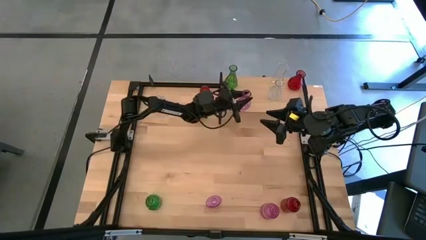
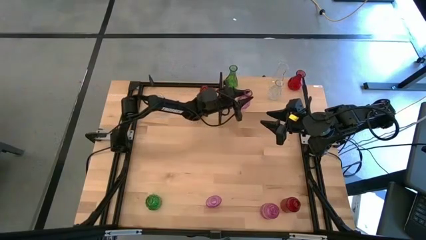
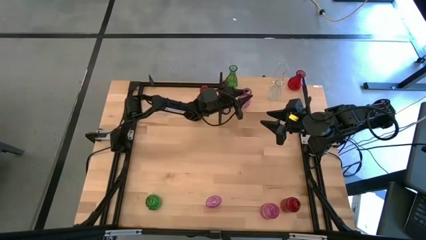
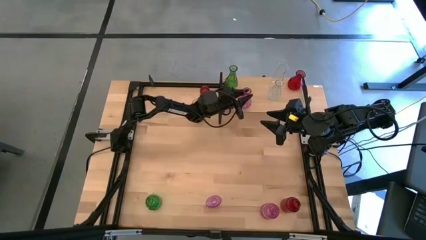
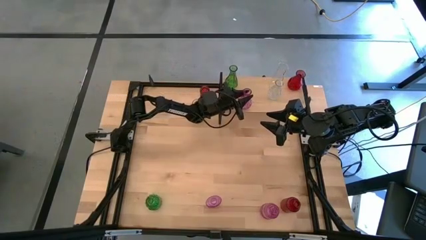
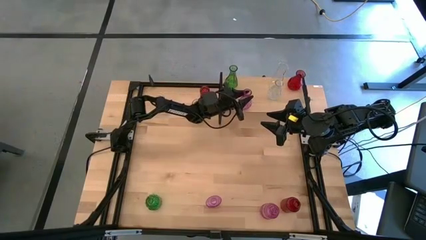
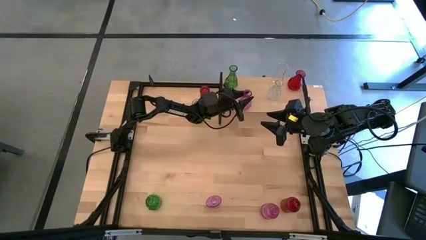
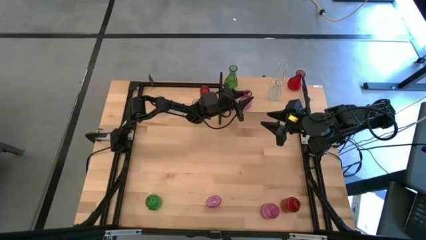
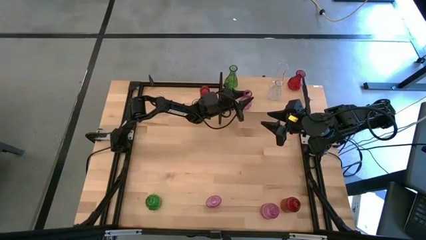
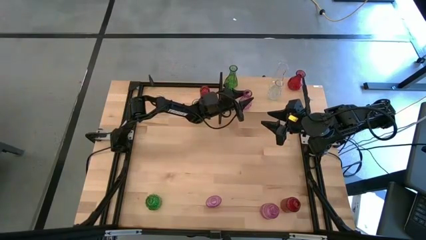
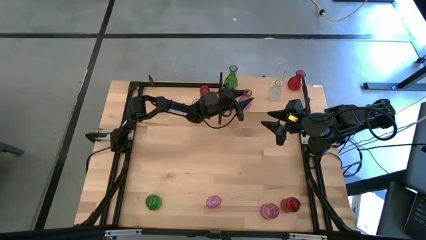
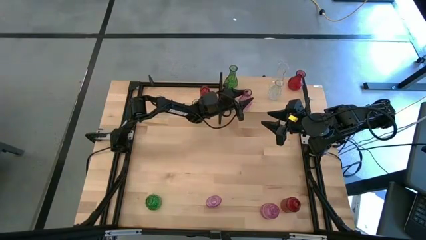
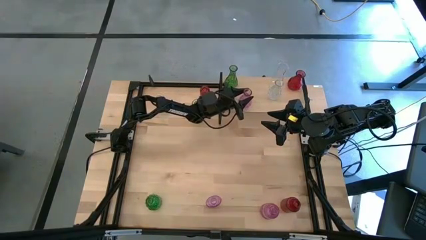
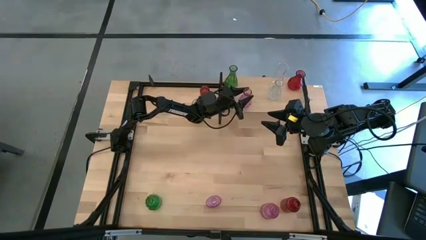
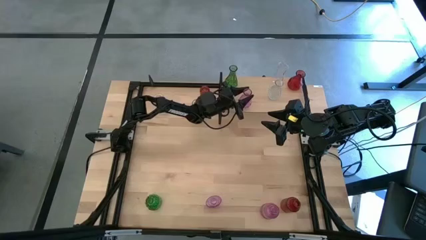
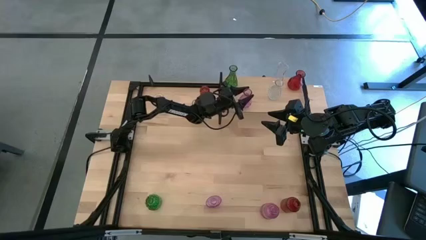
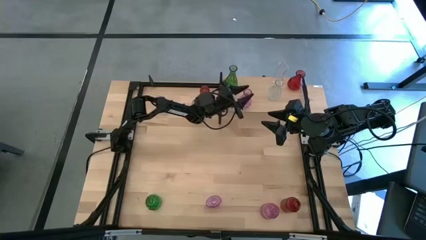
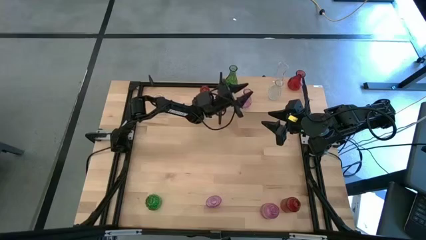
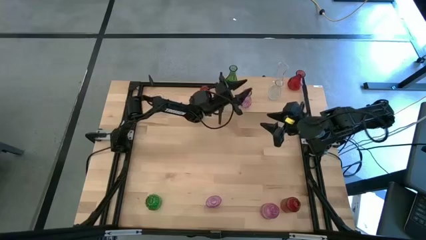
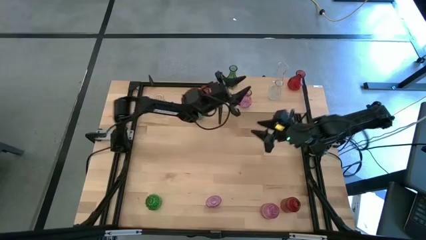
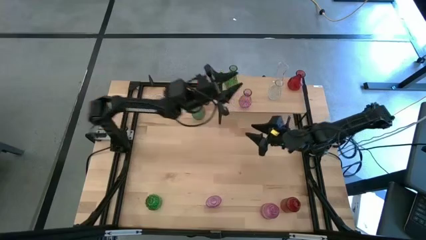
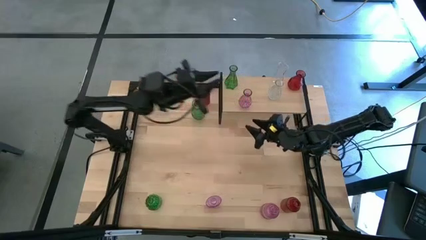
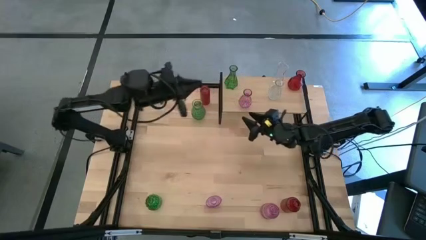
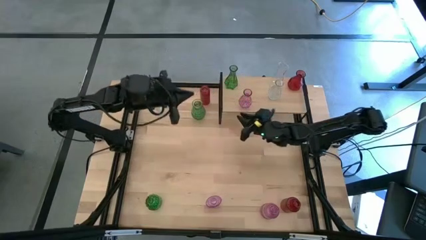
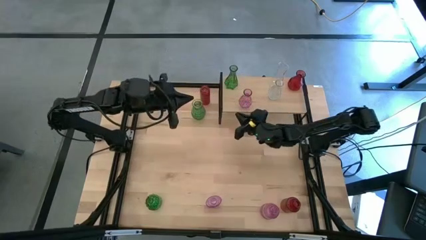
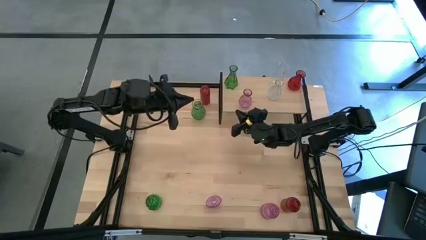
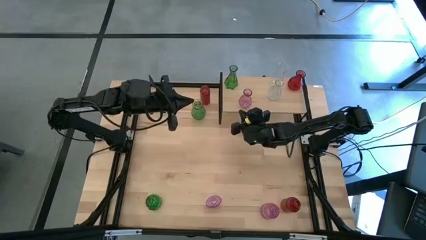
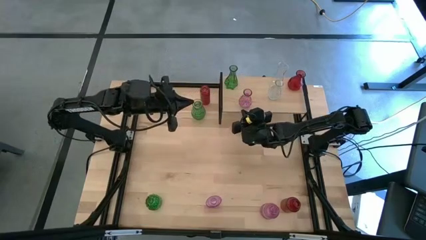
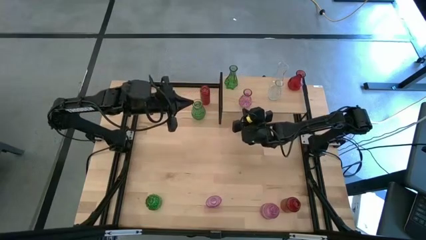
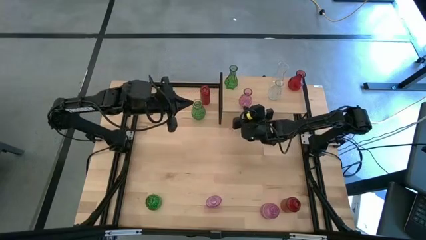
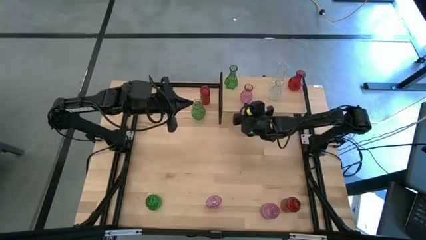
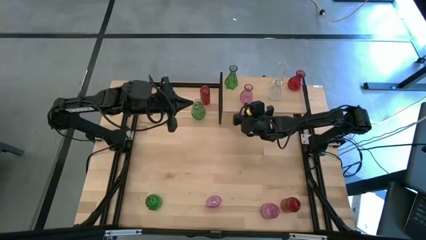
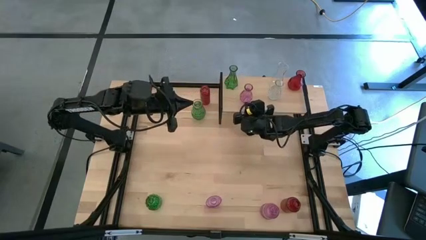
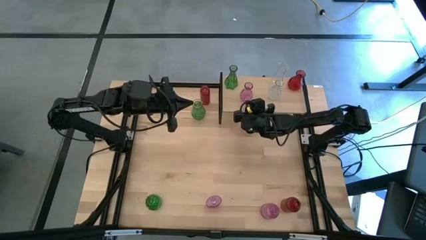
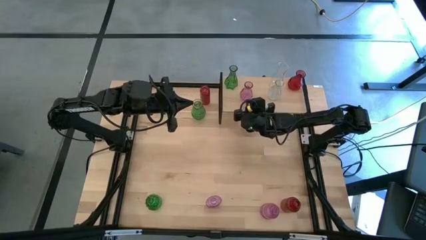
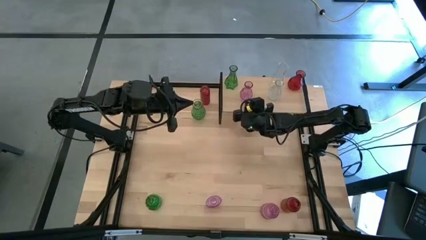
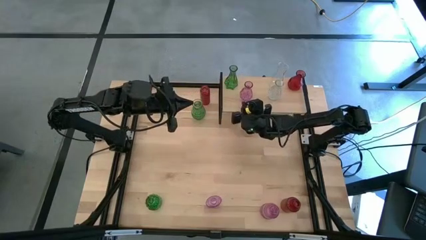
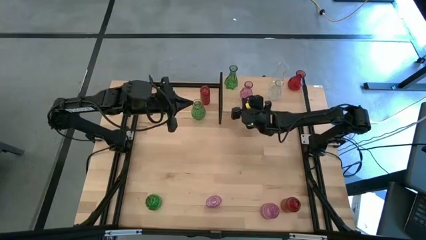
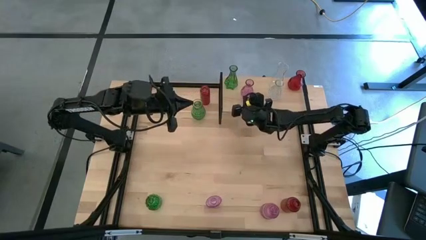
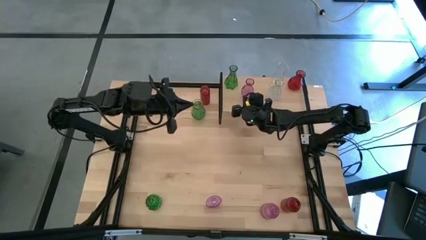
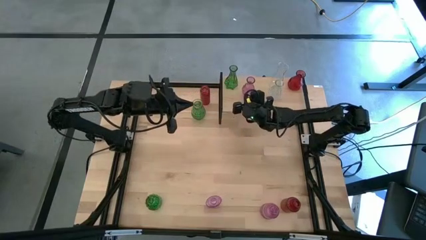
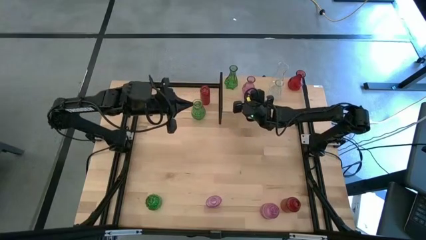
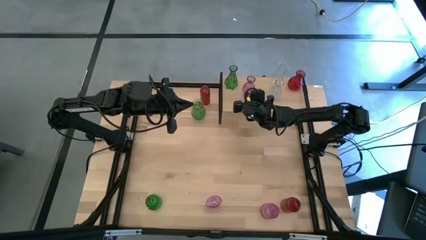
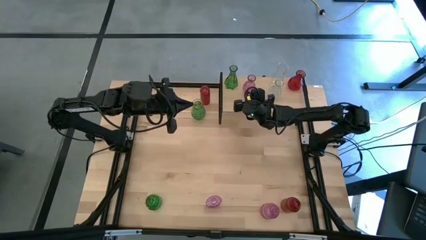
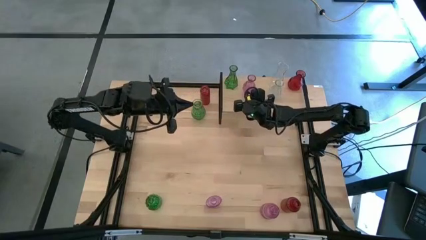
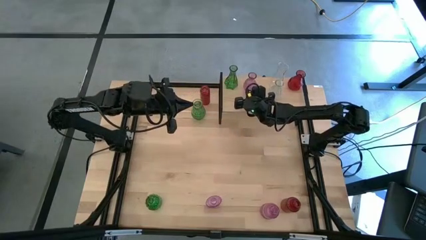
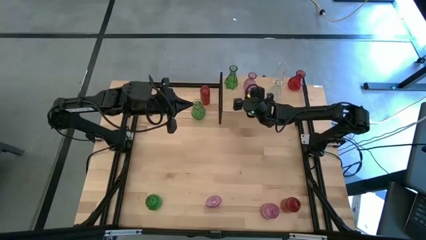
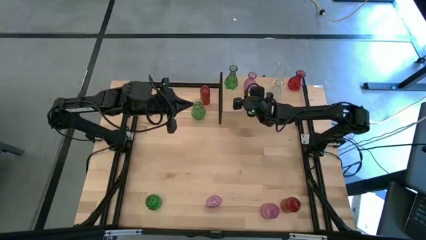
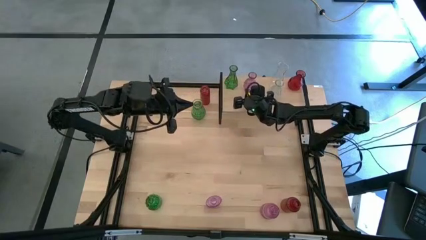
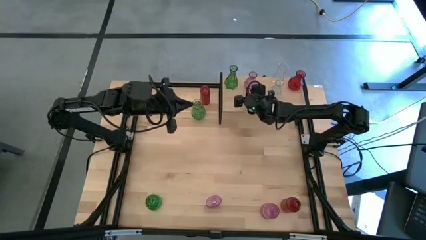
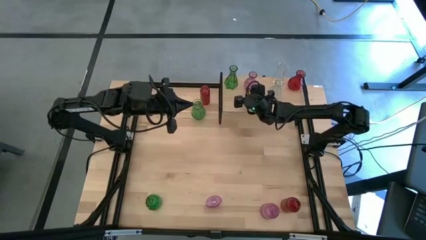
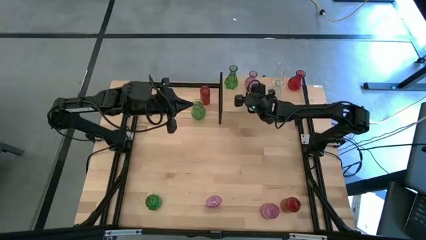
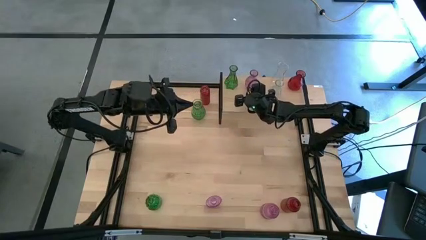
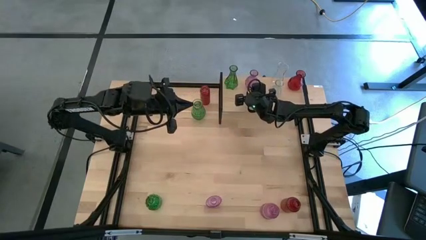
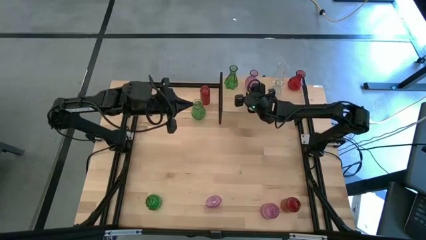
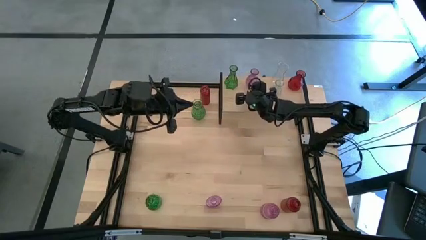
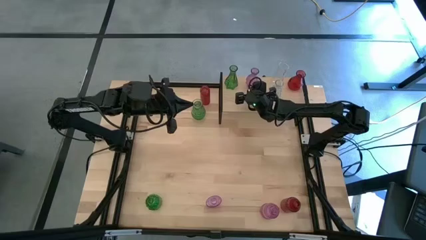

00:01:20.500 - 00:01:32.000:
Task: sort vases onto shelf
Put the top pink vase on the shelf

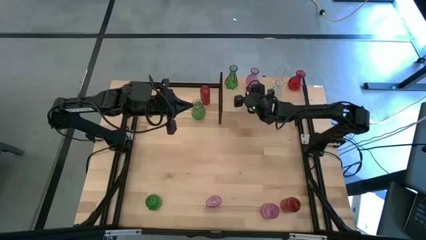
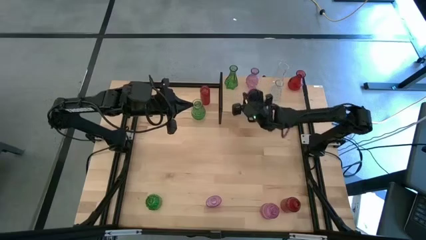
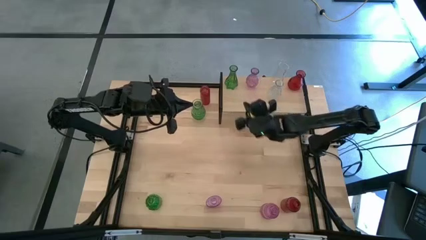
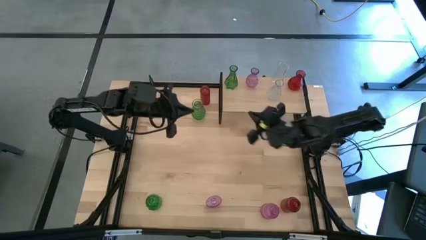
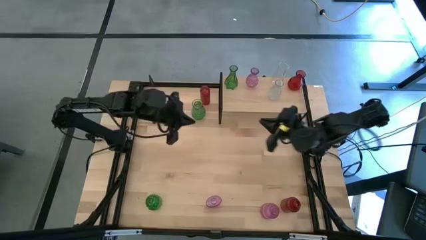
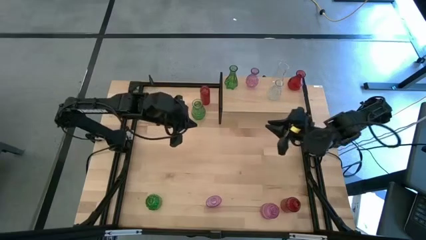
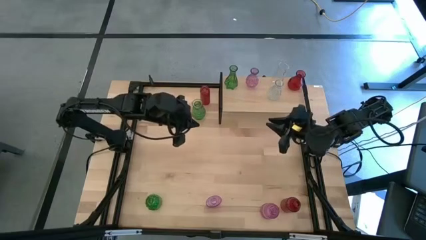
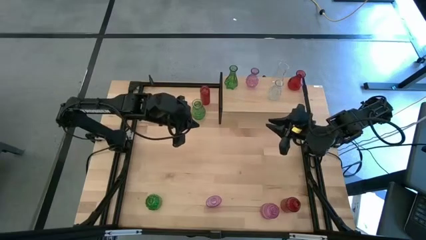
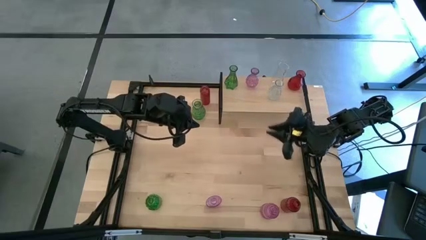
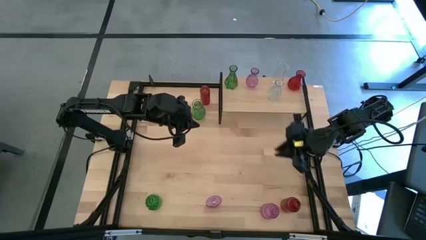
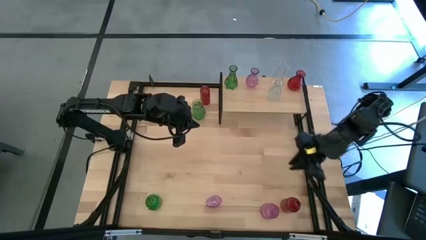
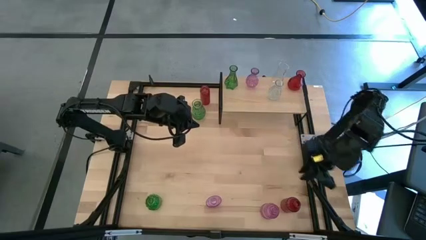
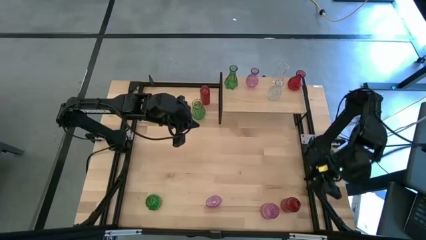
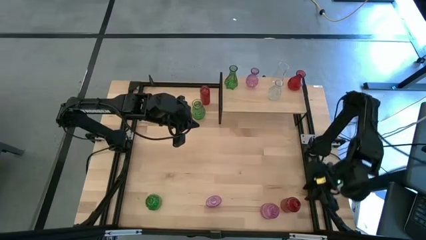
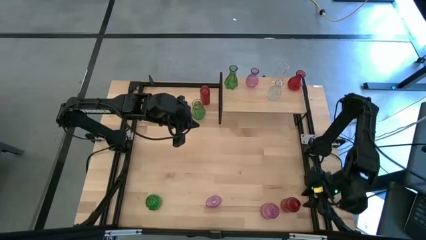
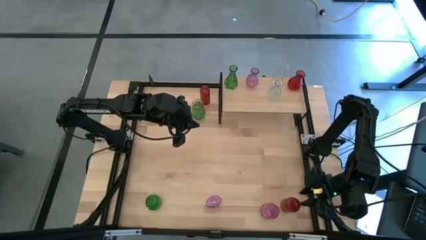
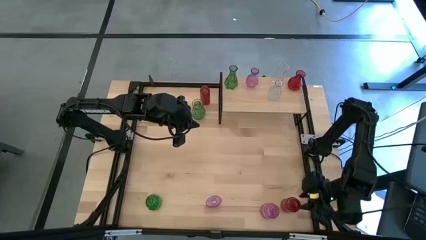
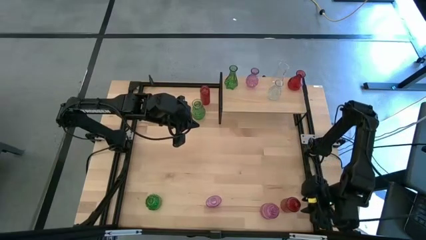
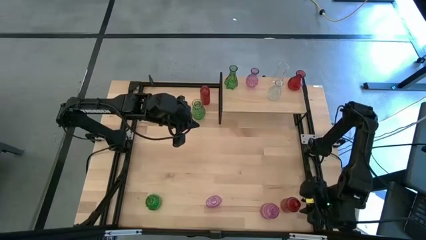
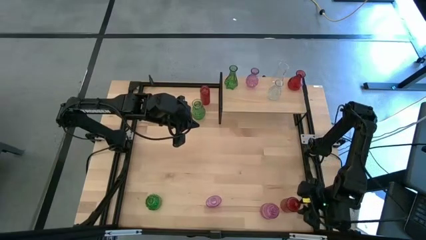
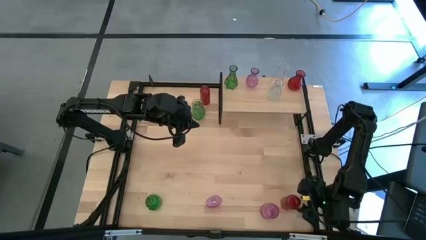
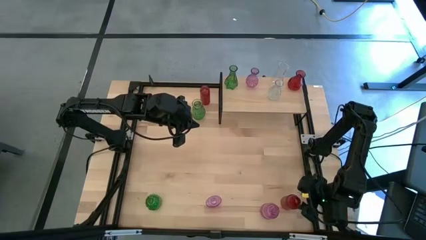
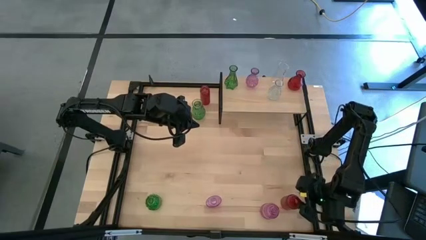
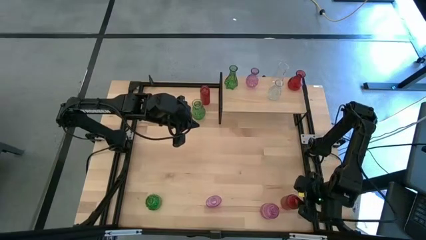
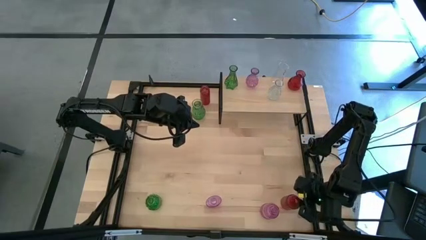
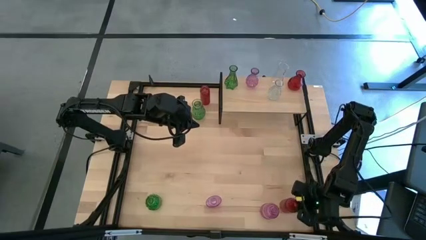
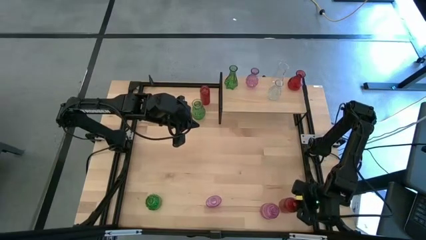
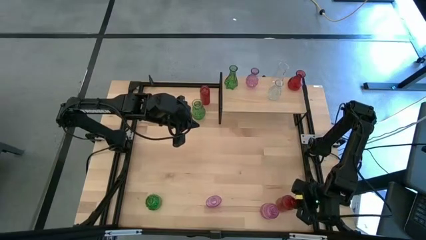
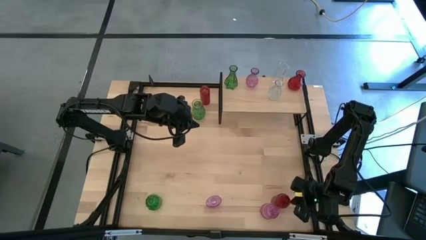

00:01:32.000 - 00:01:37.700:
Put the bottom red vase on the shelf aligned with the other red vase
